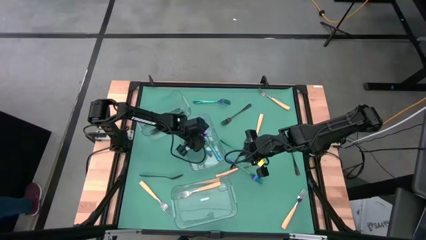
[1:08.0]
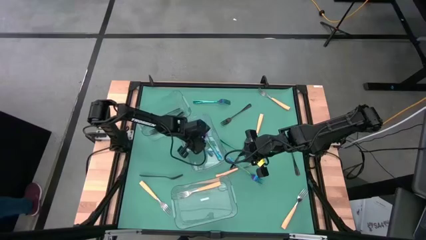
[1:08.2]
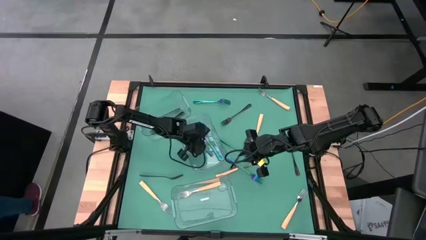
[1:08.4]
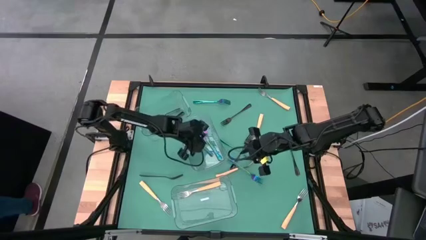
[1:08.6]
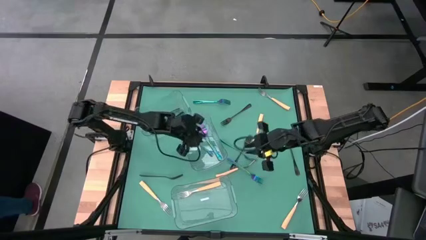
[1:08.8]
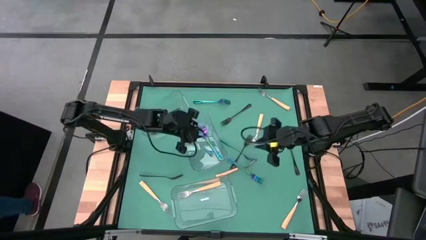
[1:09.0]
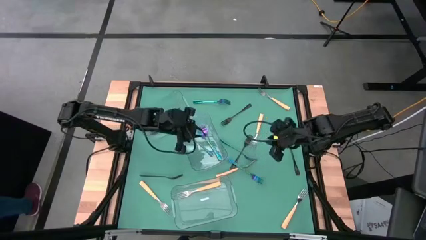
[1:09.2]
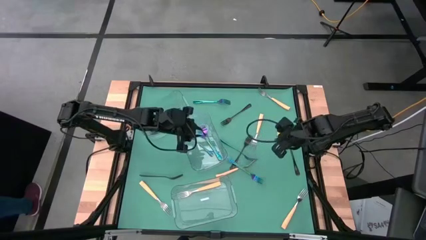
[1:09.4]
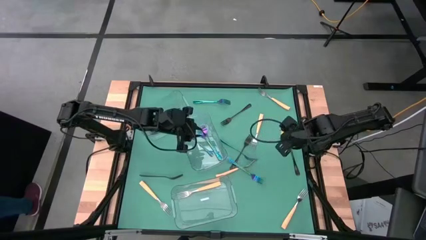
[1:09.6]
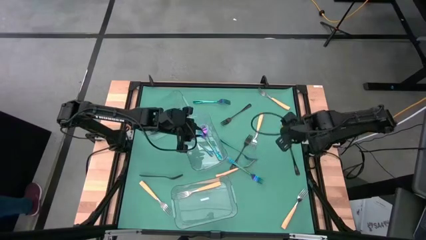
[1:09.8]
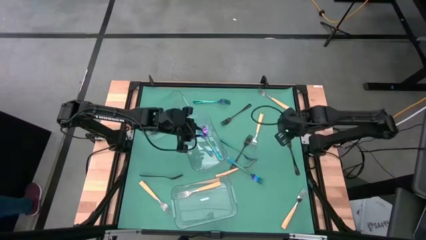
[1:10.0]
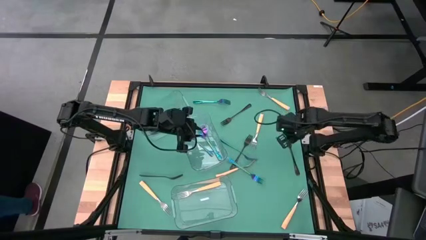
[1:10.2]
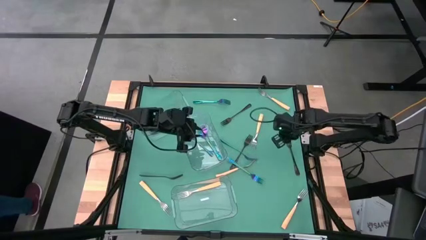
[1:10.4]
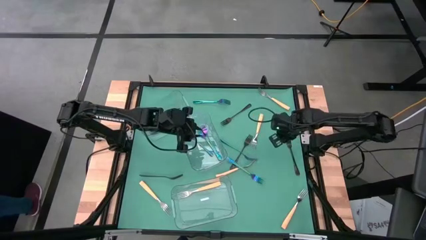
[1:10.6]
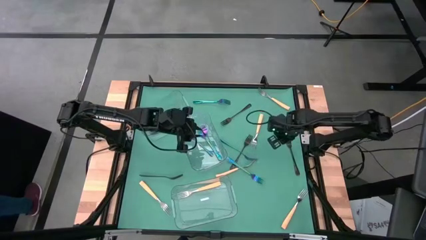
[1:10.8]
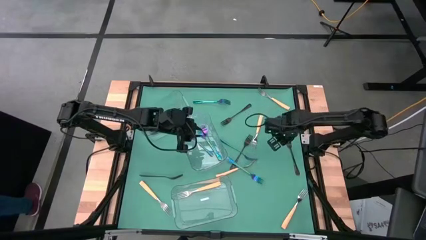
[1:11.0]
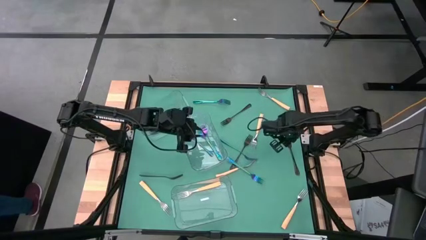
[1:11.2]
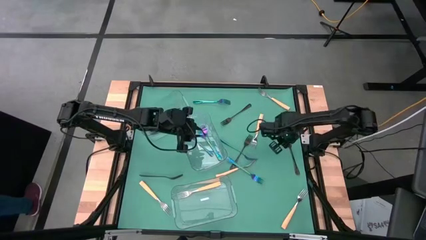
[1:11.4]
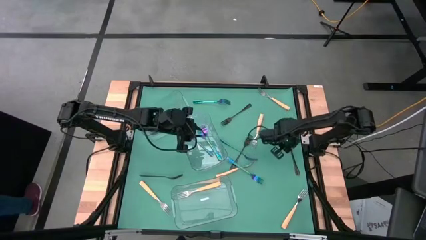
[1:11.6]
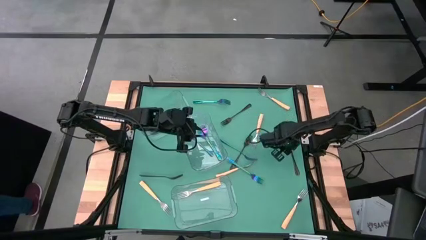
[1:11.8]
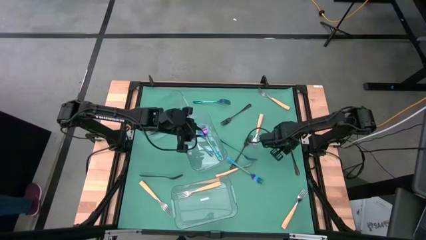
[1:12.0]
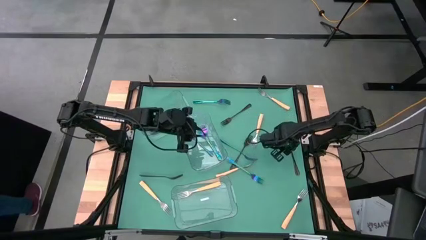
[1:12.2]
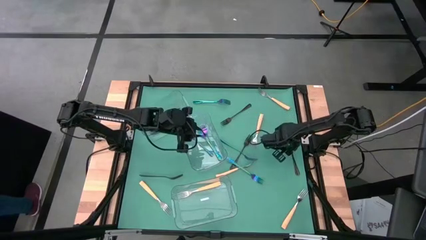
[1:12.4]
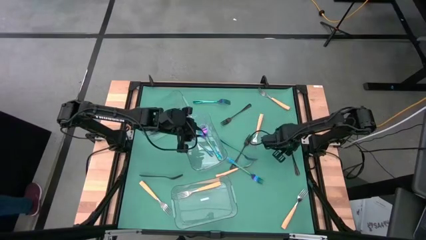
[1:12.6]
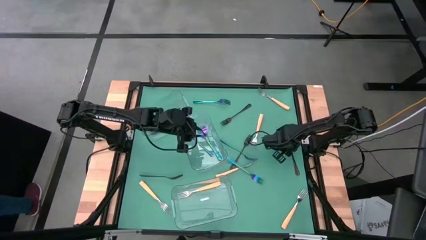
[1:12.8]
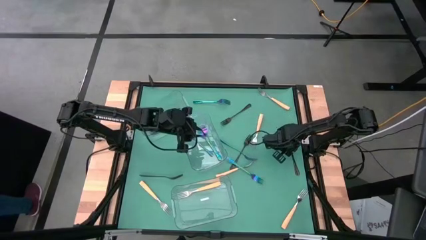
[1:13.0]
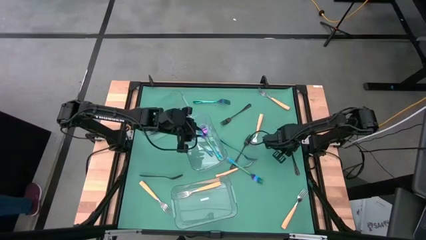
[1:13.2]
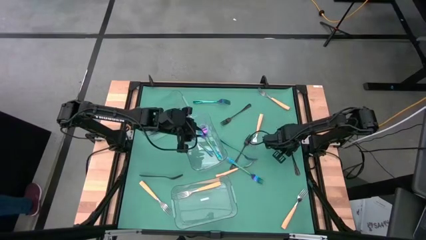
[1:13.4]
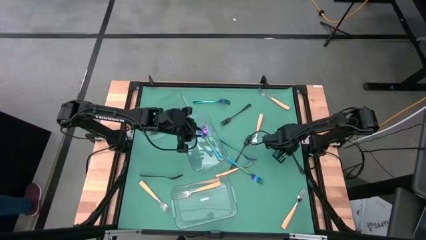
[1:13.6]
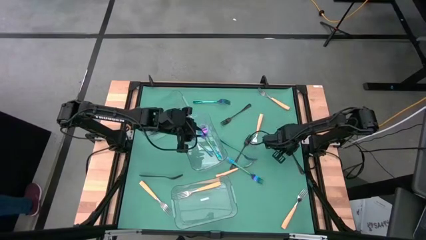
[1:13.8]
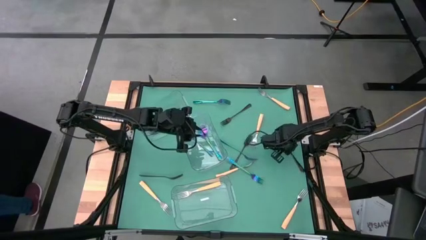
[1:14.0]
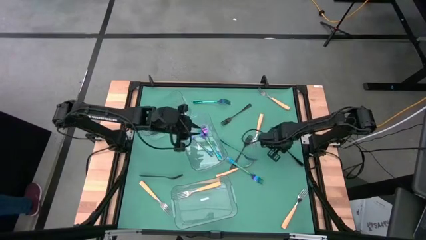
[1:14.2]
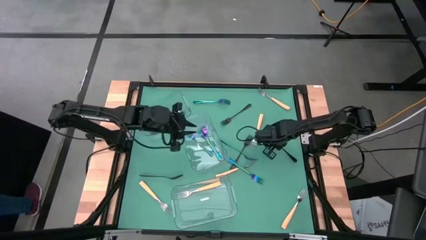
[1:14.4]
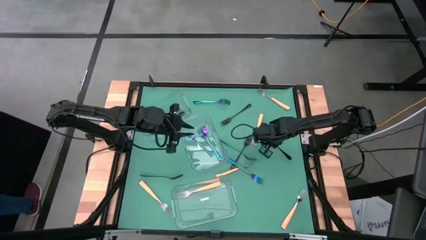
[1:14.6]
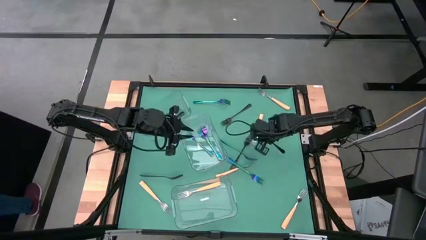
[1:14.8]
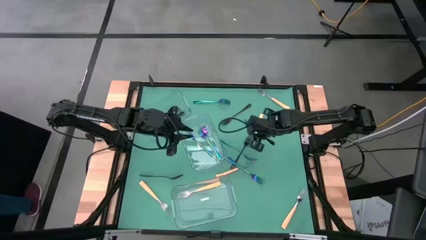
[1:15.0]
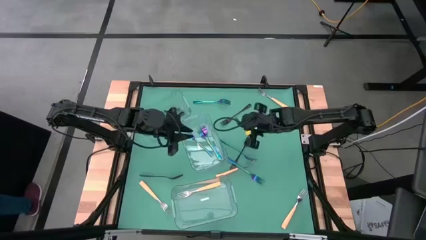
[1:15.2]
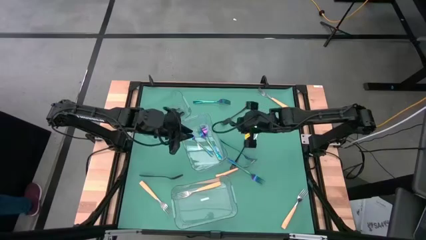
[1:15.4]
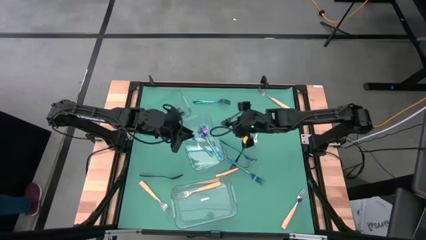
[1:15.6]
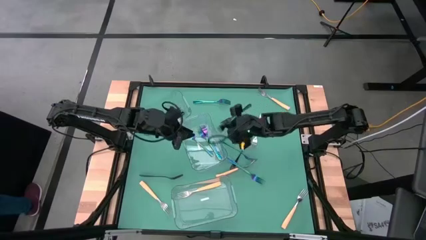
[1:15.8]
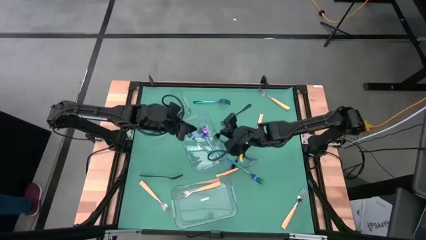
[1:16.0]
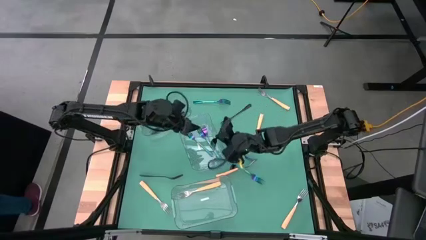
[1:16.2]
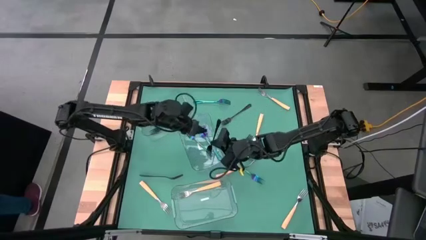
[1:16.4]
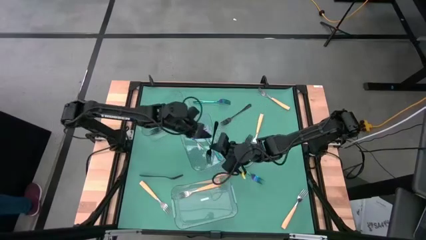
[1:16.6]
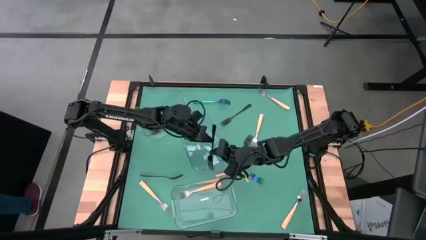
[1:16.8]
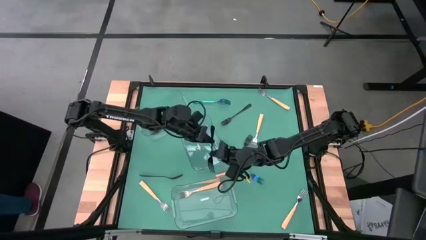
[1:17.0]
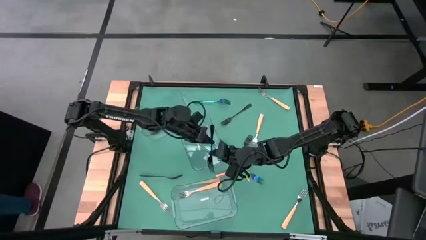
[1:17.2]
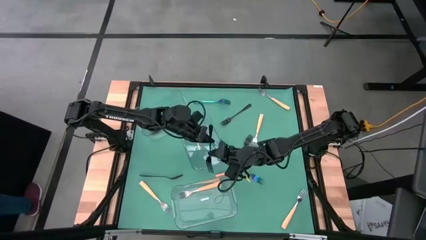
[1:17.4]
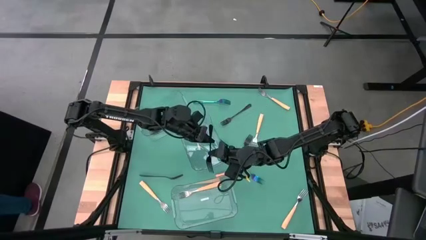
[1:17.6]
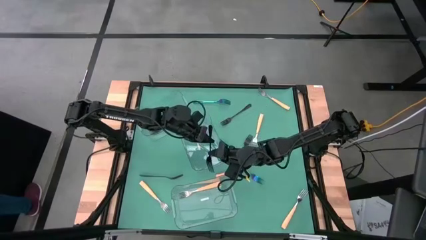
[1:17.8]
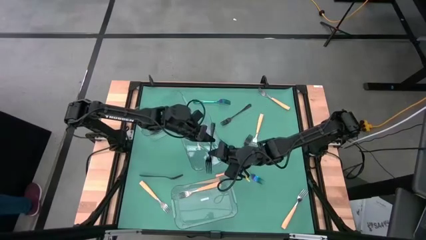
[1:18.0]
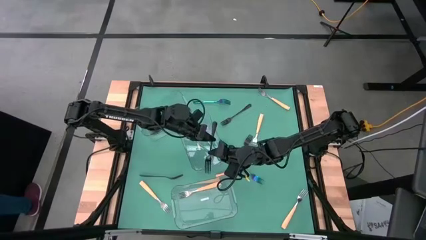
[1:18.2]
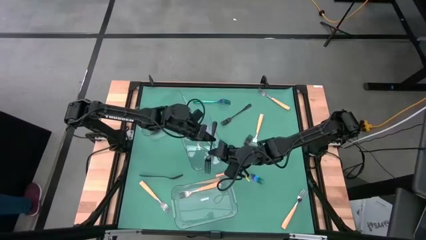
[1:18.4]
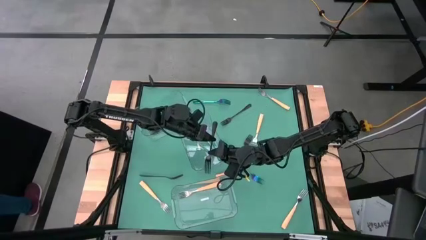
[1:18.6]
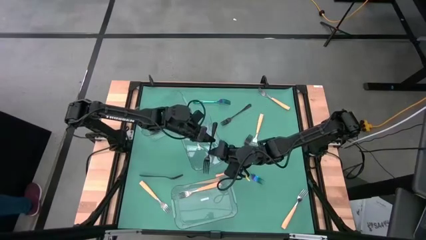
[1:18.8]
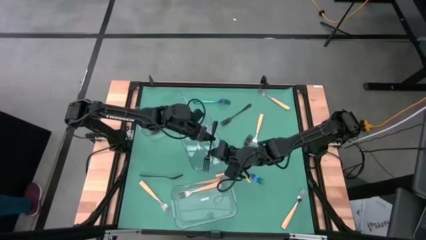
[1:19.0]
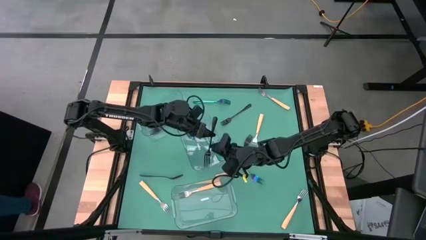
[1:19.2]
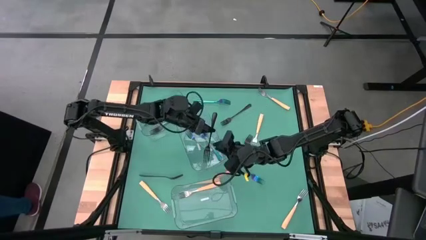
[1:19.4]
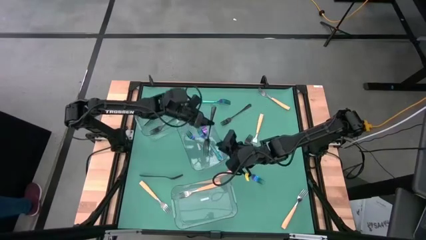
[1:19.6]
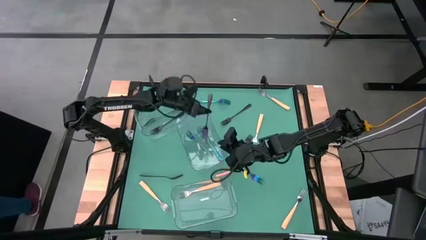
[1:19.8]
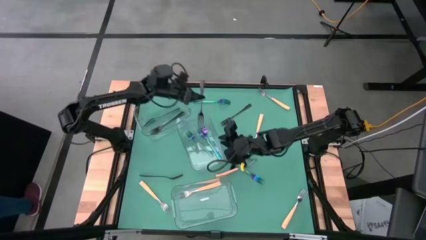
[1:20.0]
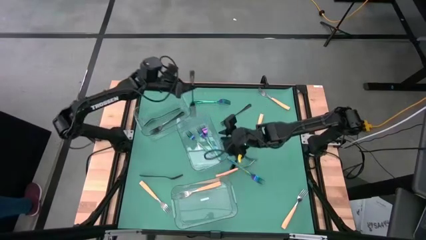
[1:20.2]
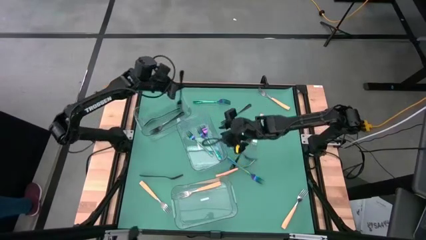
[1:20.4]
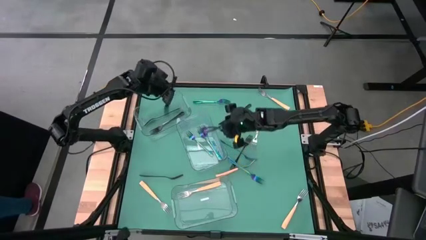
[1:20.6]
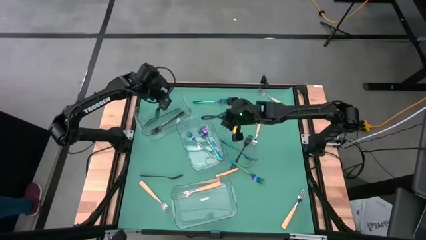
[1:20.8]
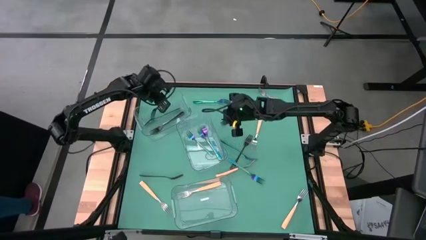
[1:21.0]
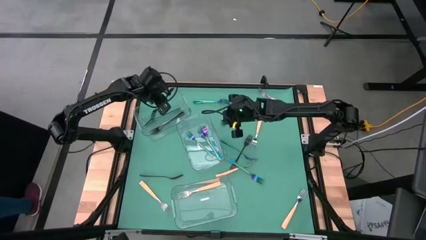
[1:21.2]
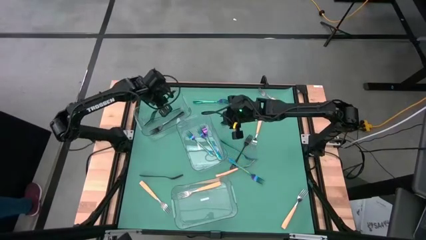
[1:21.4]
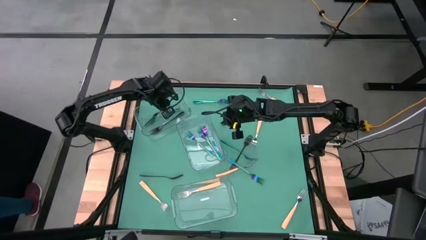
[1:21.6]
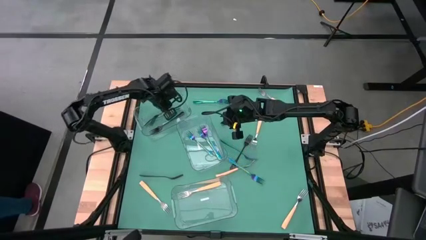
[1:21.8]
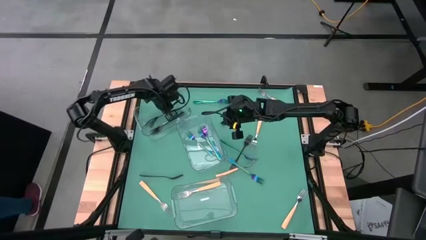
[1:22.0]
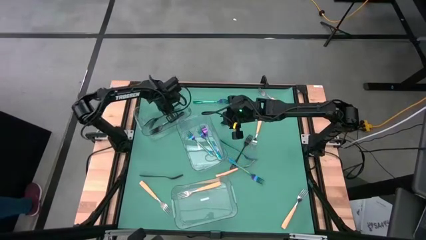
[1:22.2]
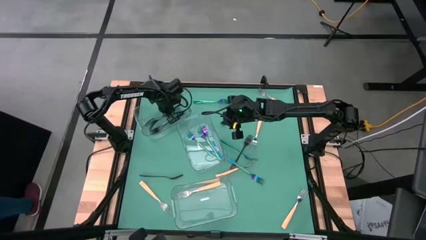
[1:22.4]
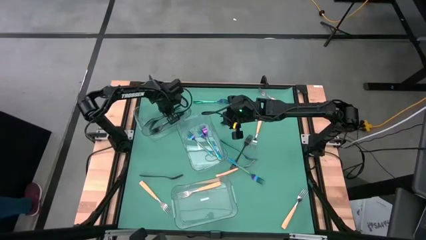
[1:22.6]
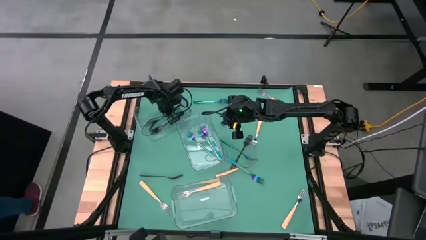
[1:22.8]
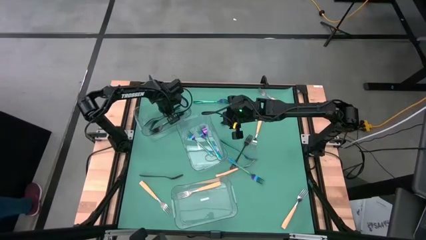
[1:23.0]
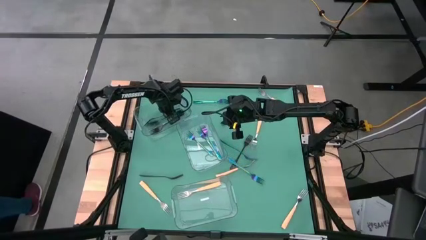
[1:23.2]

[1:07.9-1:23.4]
Task: Sort silverware by color (type)
Put the black fork into the top transparent bin

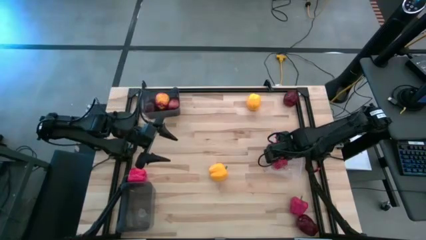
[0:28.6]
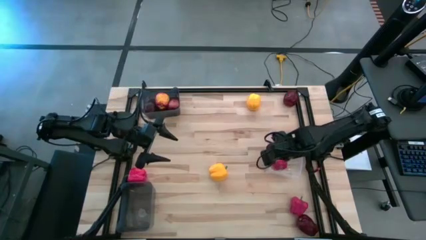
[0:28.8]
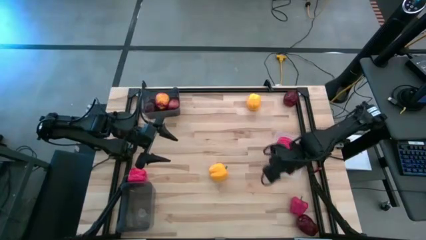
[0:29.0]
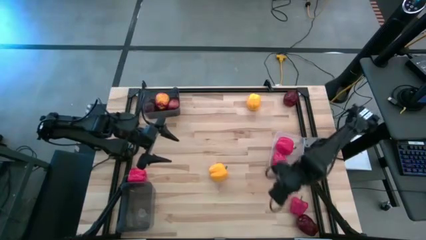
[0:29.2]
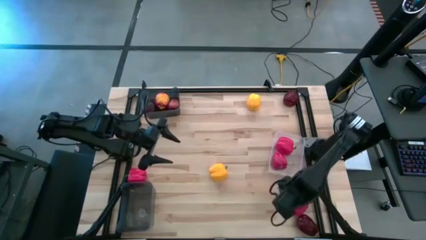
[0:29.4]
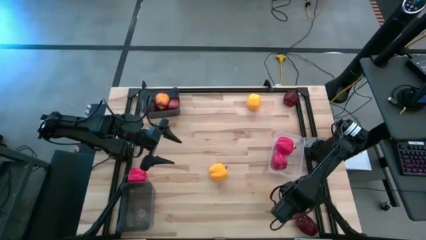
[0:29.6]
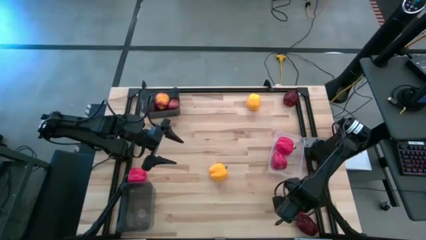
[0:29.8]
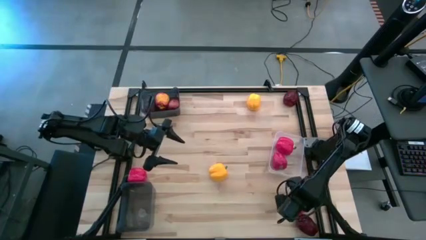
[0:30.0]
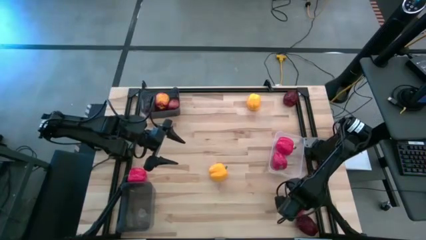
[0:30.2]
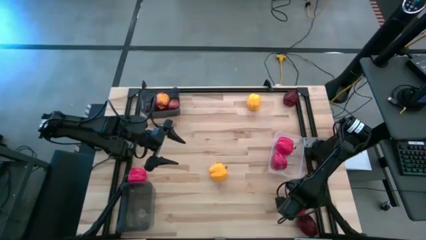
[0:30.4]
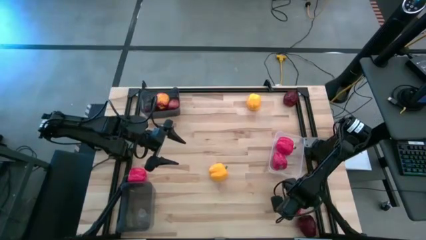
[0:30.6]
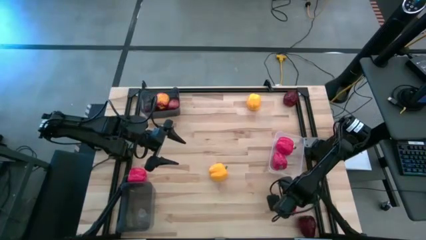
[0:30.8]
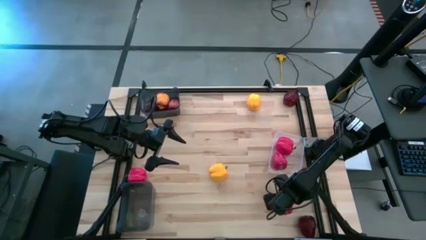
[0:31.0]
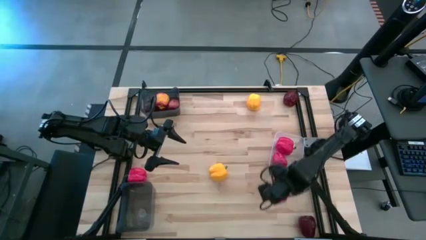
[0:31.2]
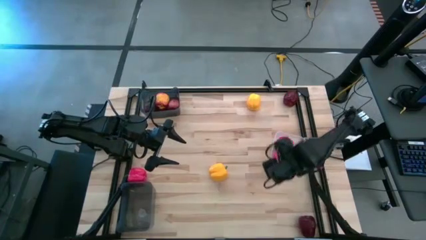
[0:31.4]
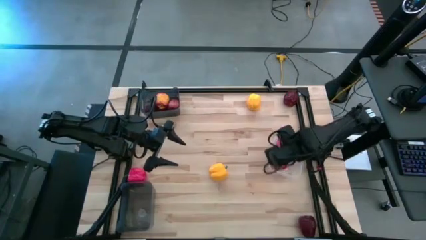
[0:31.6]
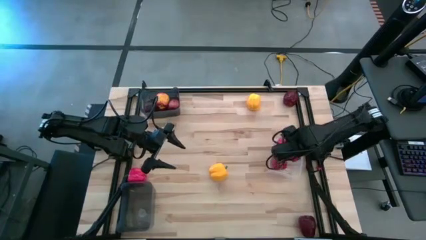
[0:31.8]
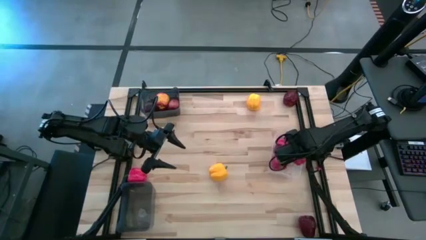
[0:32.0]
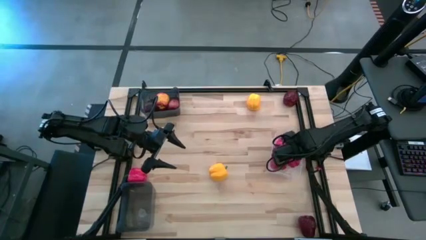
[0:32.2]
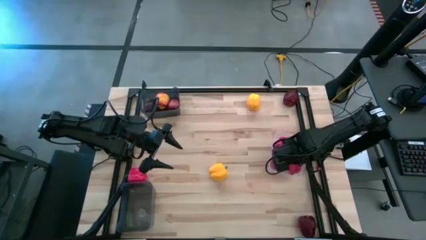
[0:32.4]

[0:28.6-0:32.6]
Task: Sort produce into baskets
Put the red bell pepper into the transparent bin
